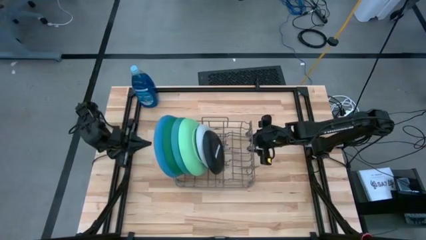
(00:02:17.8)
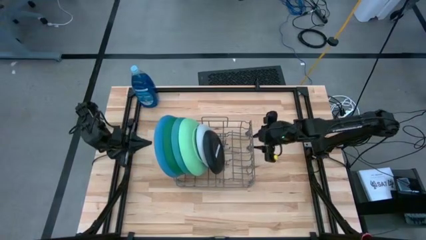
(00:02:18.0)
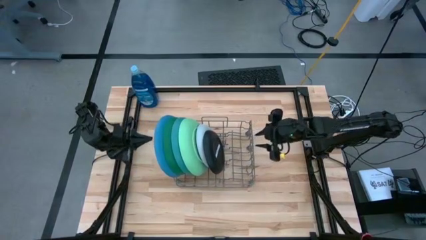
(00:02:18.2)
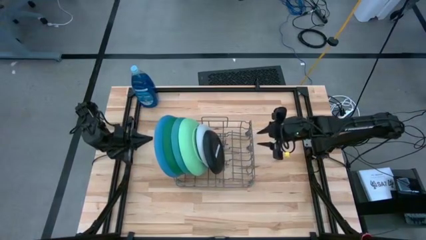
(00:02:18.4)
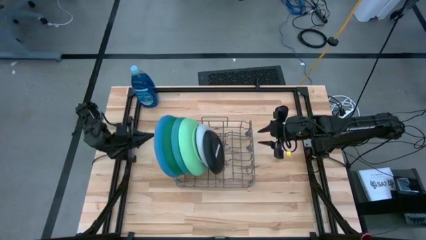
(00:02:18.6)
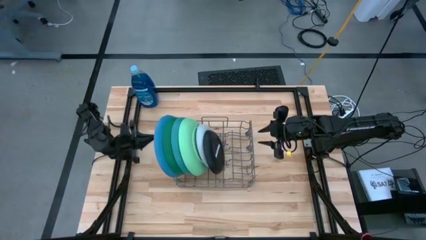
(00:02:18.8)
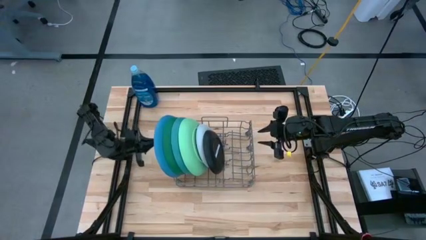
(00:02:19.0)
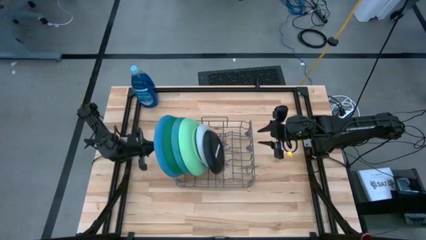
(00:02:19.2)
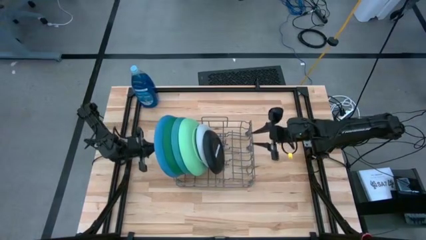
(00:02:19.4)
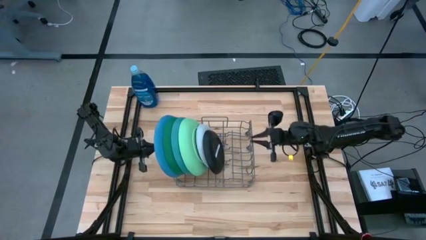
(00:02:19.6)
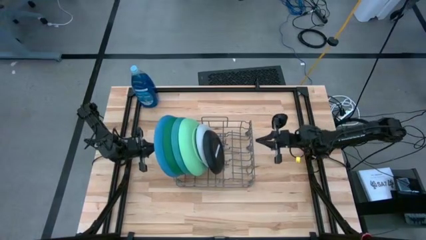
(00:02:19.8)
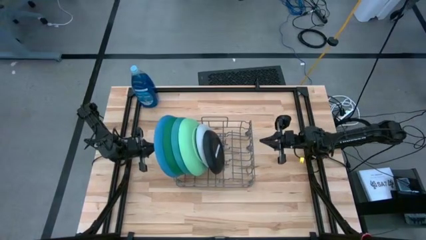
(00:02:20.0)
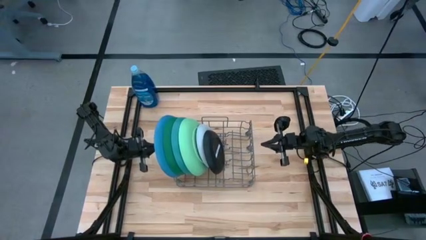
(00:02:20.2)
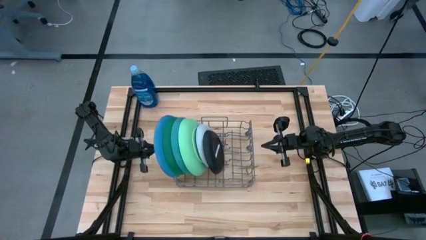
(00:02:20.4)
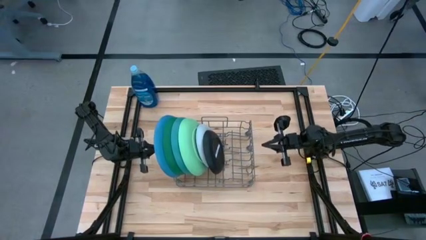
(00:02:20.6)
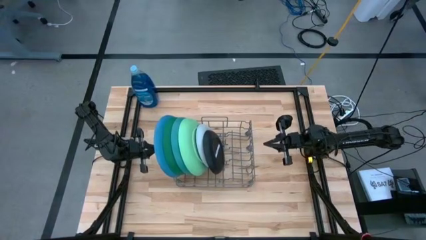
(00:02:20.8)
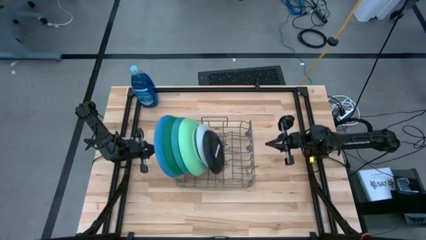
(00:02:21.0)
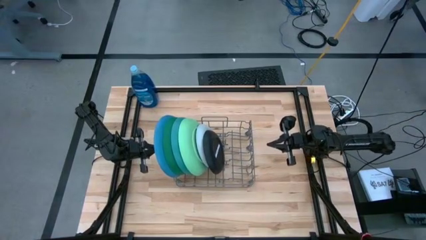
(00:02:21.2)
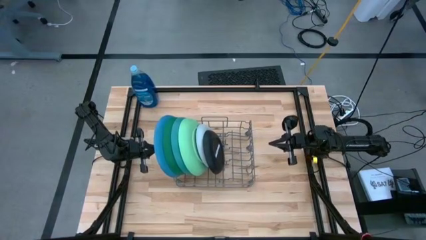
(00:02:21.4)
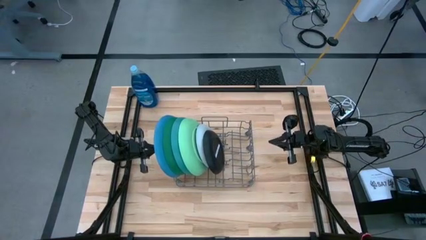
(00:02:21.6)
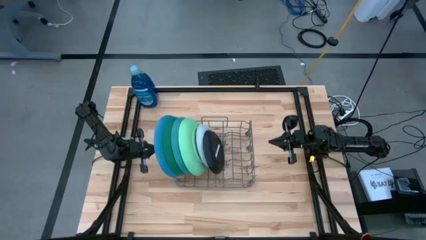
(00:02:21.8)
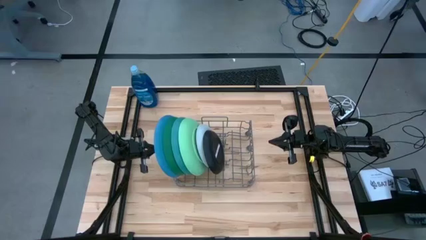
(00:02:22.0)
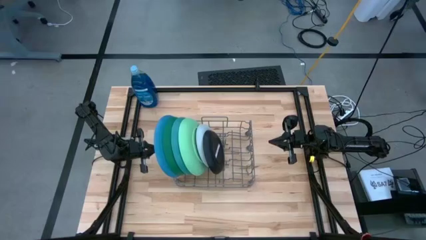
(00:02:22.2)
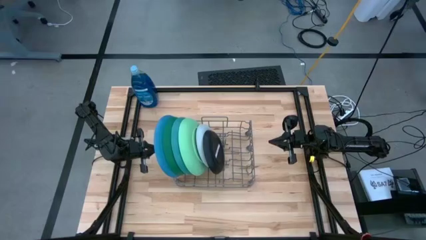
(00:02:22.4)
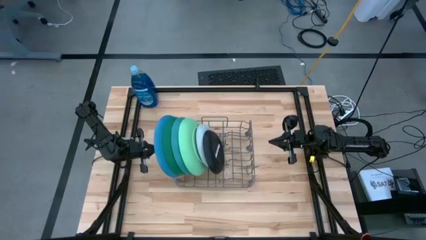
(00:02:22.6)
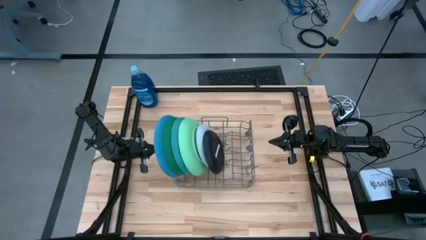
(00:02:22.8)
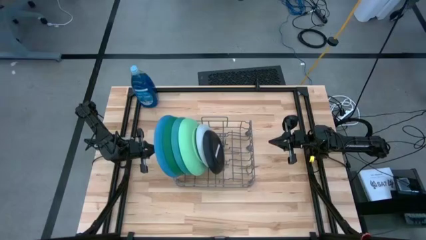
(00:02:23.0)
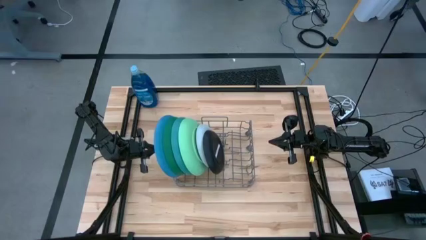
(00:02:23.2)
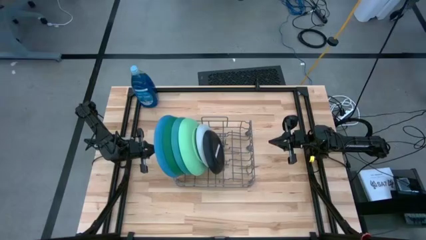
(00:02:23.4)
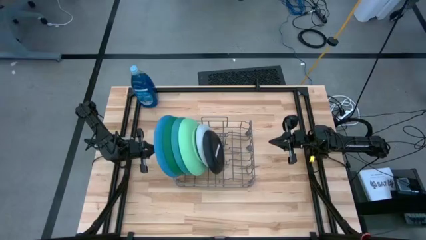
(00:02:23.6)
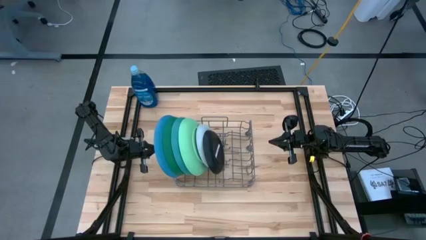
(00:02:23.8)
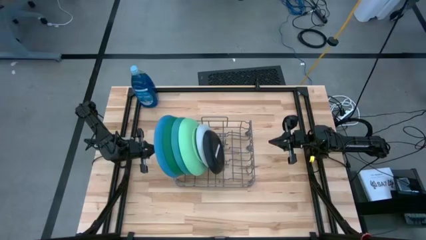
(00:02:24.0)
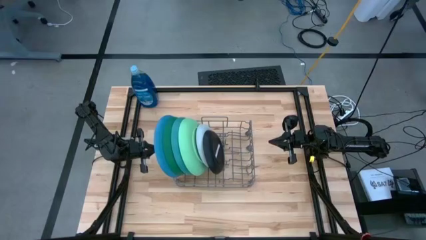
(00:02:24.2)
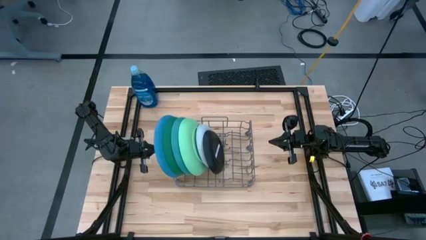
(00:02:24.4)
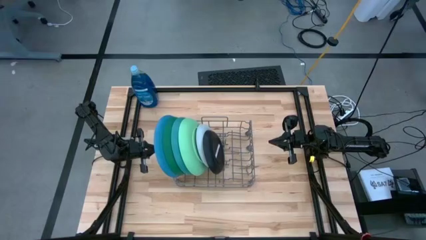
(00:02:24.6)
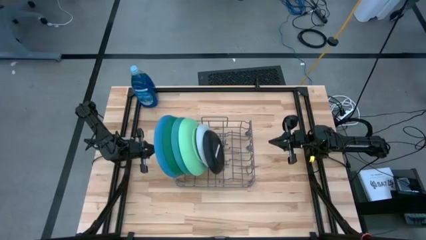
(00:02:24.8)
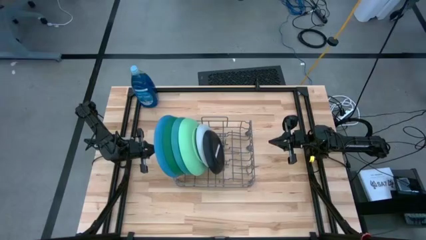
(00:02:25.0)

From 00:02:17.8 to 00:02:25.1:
Task: Sort dishes
Return to Home Position

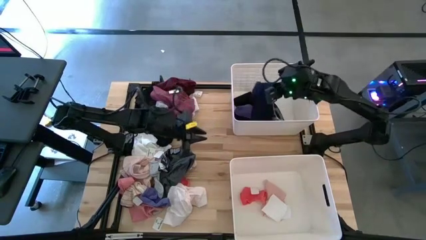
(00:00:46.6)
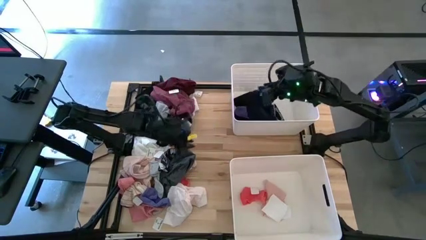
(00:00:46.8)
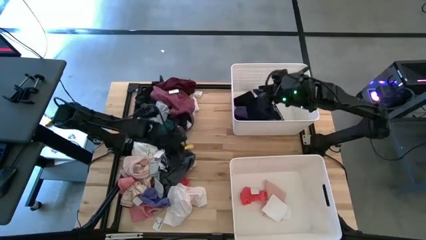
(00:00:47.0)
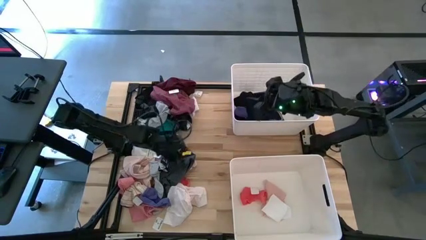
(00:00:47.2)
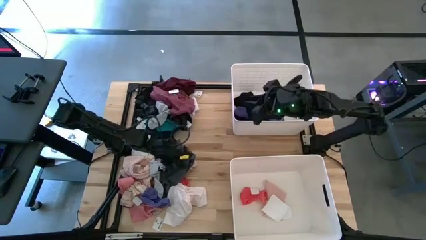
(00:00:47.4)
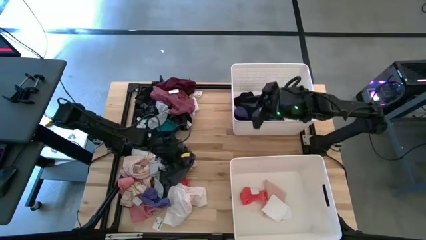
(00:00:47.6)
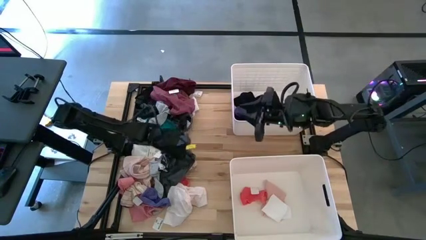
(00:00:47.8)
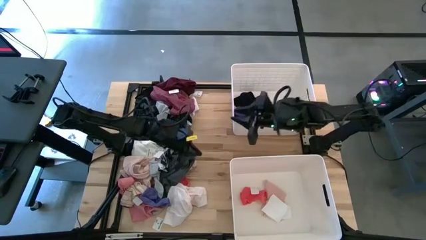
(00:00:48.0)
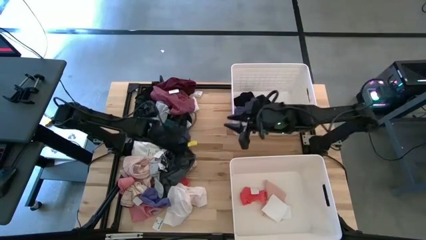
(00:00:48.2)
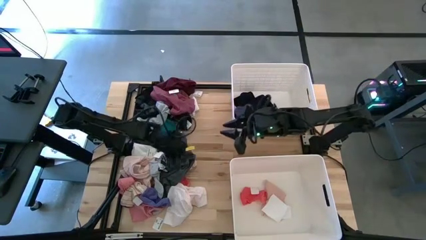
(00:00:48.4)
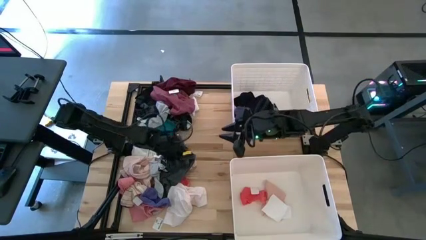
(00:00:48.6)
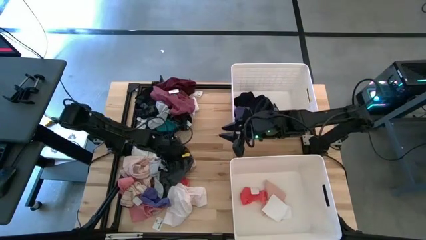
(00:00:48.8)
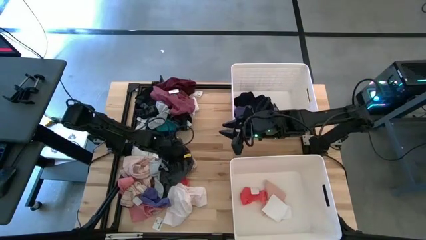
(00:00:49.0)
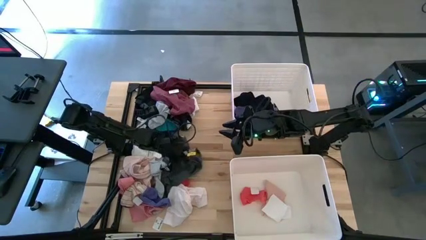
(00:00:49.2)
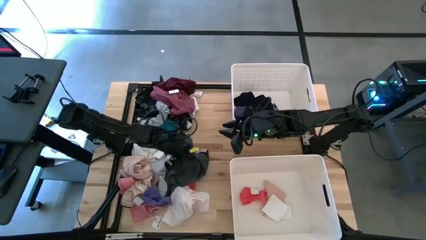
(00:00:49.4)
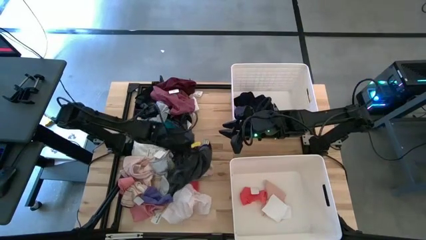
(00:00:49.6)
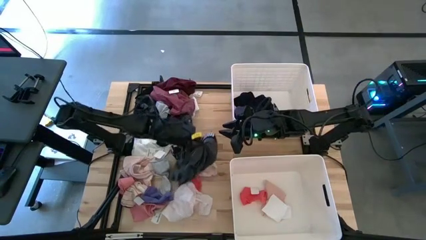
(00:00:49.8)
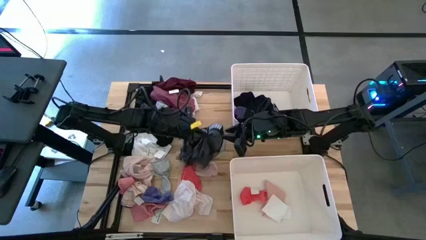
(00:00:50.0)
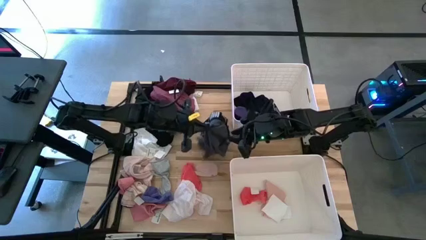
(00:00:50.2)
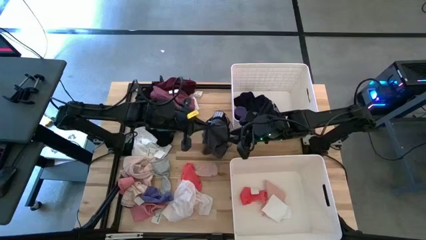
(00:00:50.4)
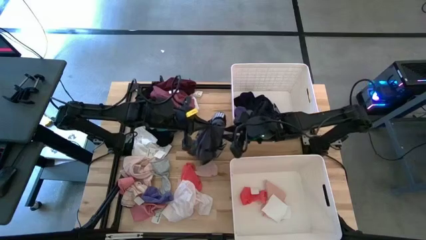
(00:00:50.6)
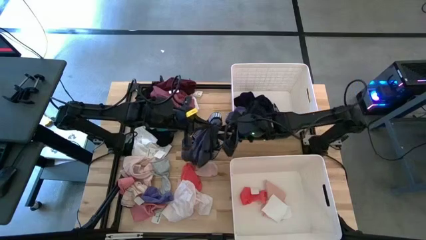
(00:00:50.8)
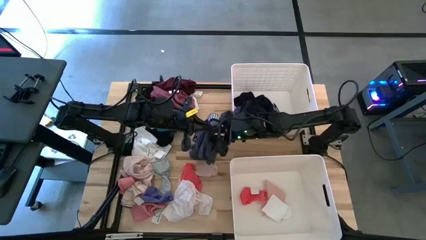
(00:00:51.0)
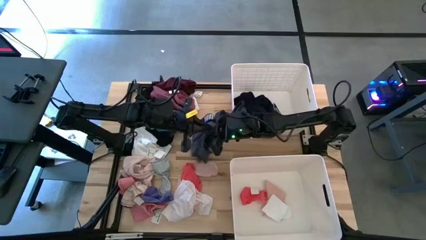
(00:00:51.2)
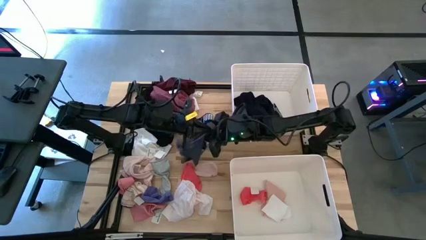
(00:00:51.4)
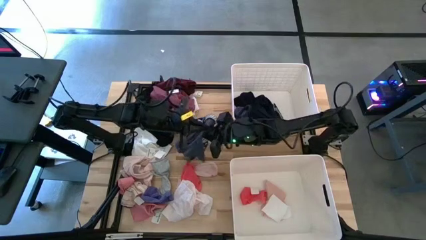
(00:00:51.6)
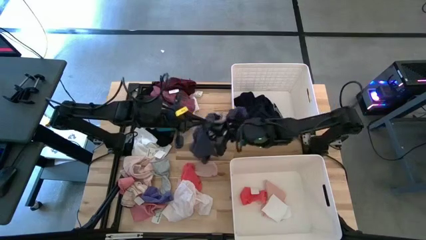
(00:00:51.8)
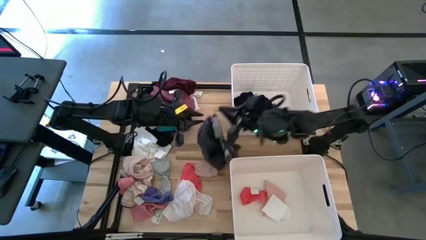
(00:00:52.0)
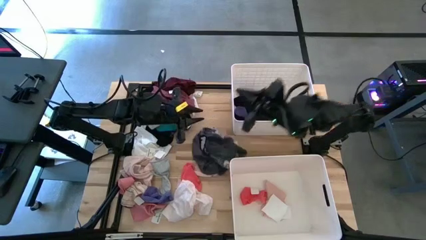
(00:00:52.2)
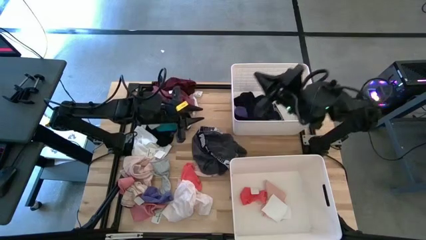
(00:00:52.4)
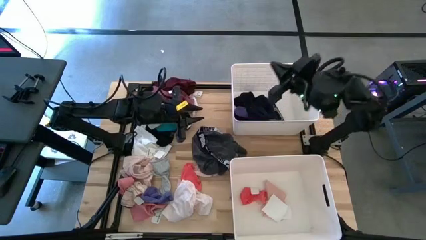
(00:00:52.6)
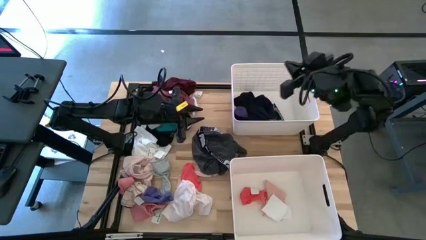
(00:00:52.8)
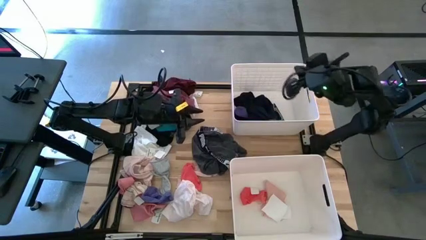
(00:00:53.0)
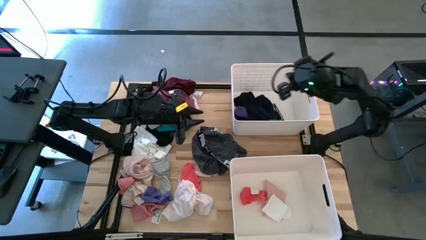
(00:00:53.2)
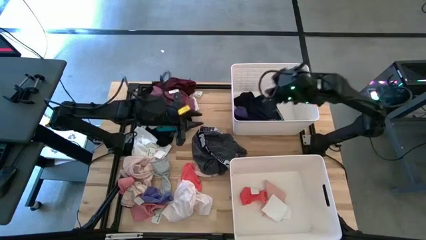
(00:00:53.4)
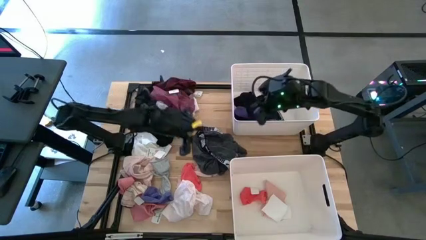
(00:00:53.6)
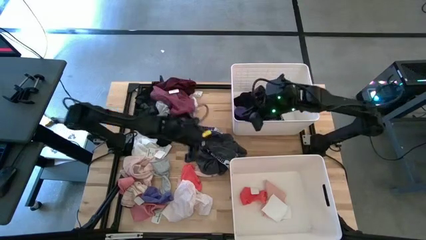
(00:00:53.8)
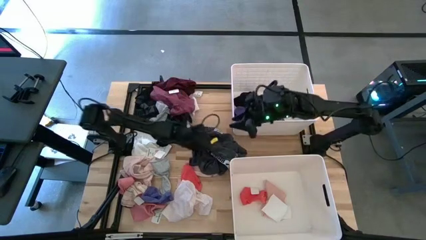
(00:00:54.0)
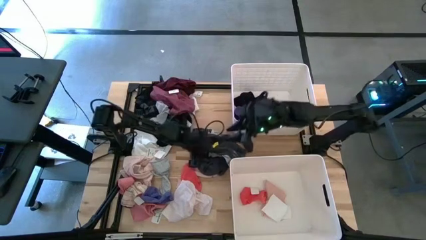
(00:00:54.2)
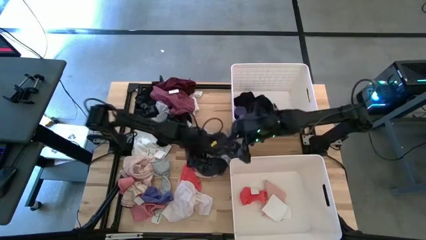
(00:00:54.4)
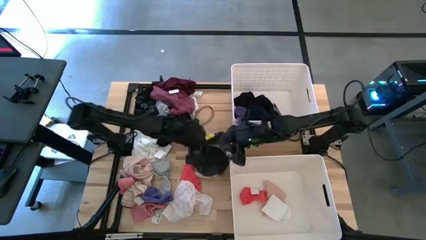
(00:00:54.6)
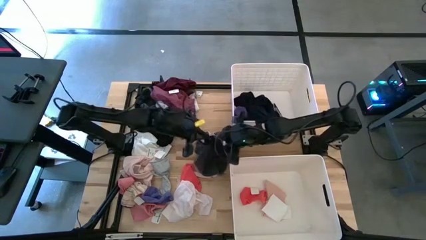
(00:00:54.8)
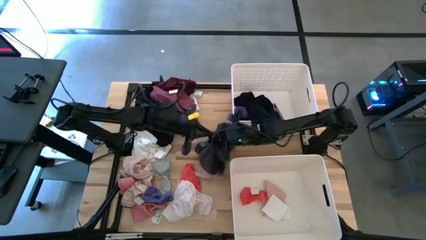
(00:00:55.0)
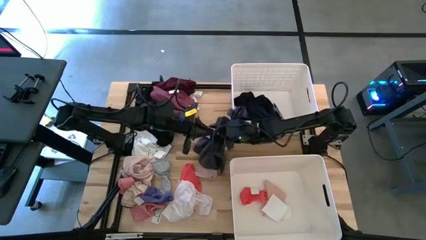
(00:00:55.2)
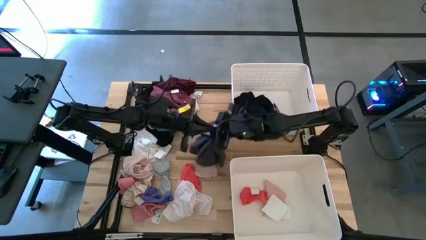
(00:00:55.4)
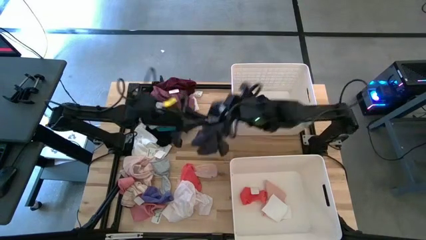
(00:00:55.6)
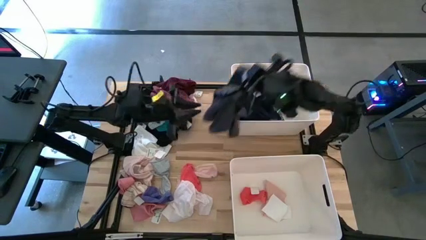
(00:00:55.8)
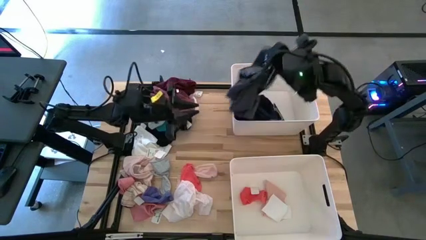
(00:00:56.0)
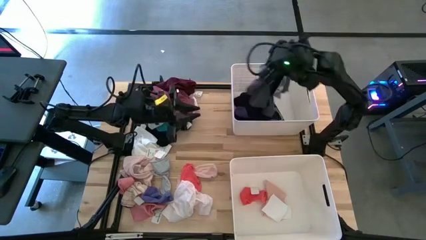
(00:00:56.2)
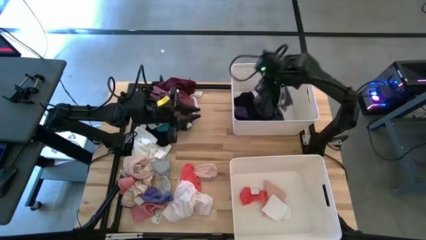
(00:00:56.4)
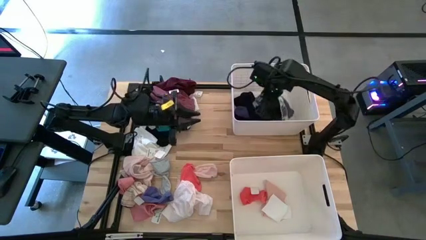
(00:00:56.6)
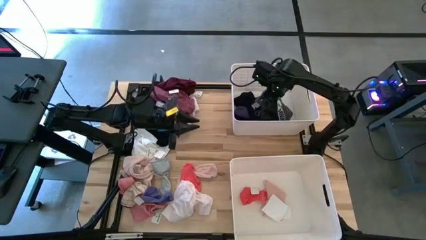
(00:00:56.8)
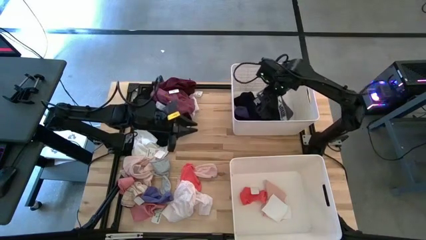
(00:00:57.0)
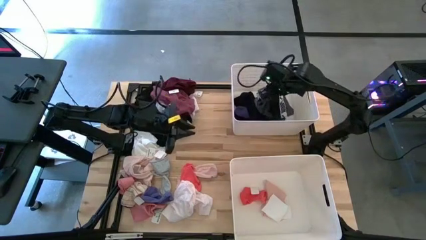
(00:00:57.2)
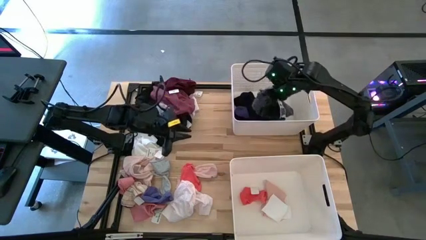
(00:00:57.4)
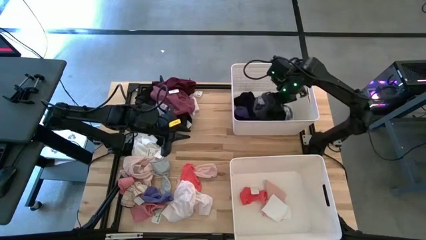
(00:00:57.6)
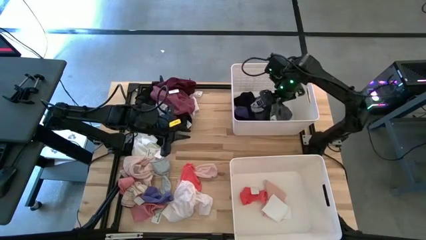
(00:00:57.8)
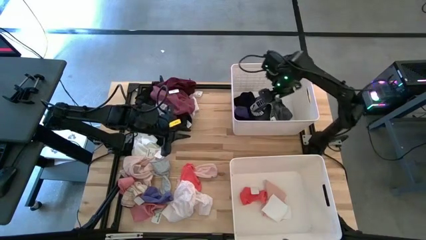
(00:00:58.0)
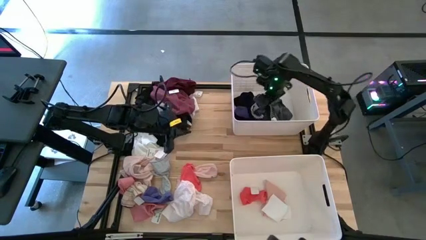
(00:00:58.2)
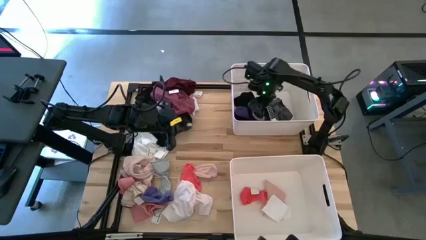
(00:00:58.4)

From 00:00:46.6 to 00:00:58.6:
Task: Sort clothes
Put the grey shorts into the top bin
